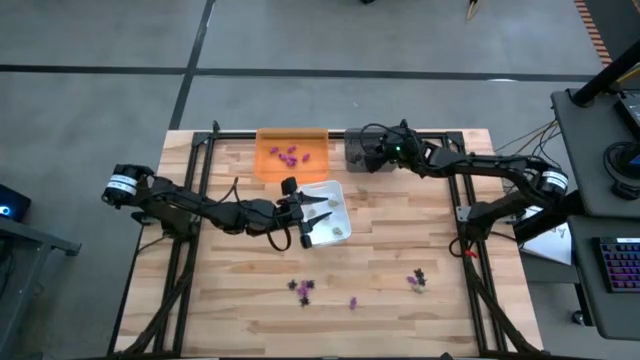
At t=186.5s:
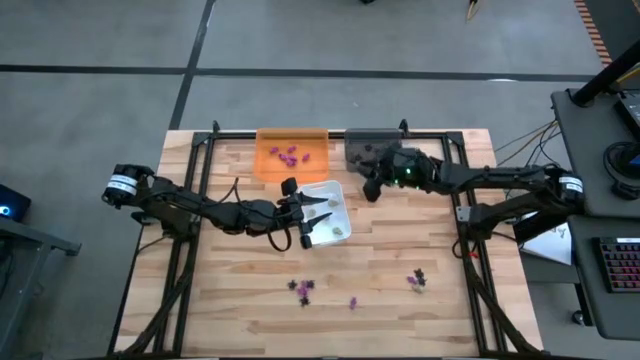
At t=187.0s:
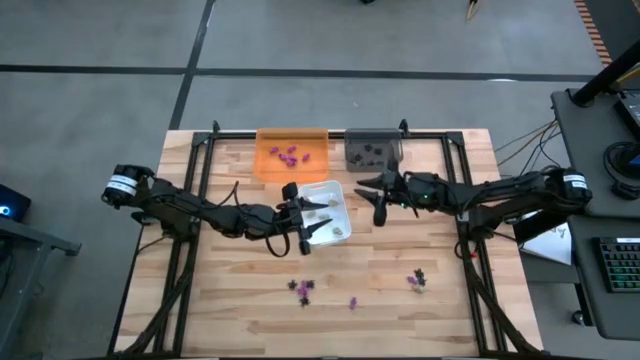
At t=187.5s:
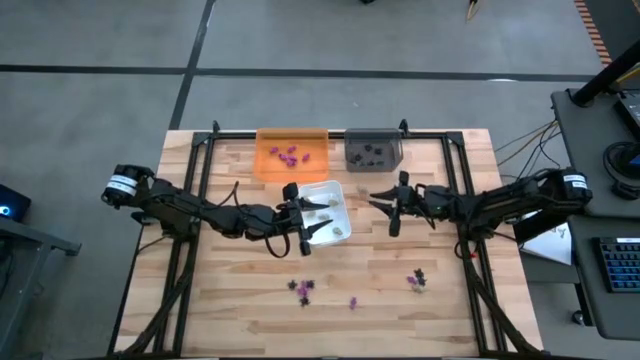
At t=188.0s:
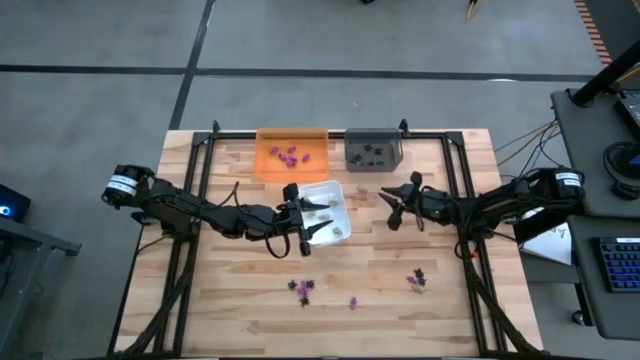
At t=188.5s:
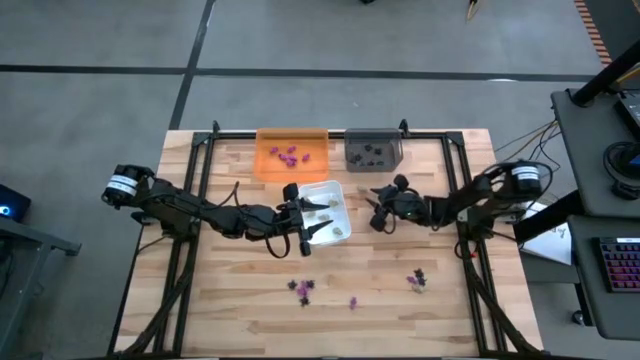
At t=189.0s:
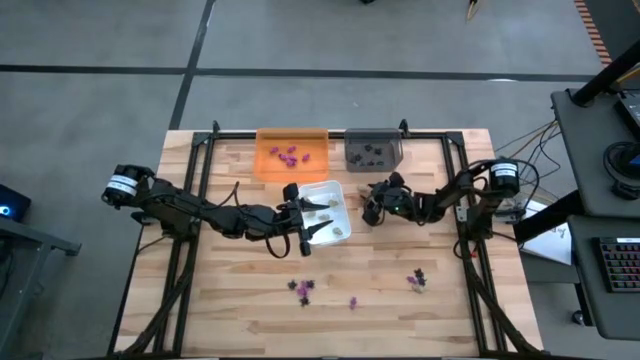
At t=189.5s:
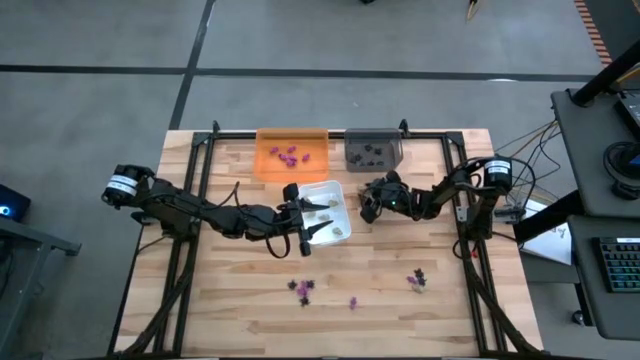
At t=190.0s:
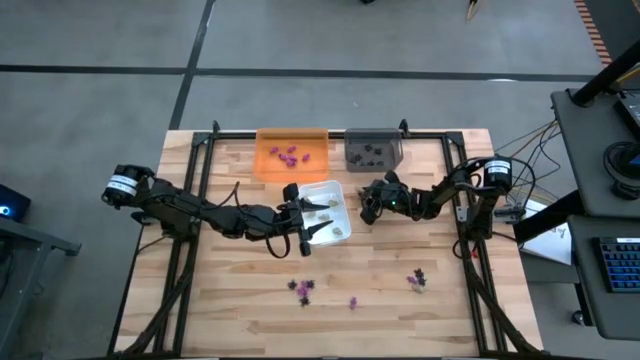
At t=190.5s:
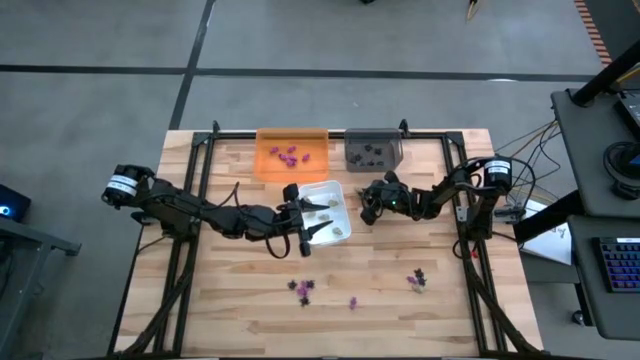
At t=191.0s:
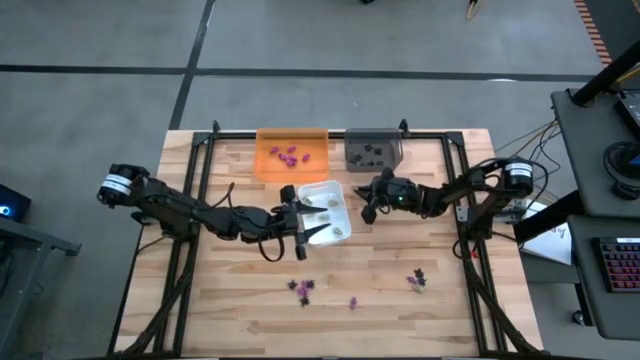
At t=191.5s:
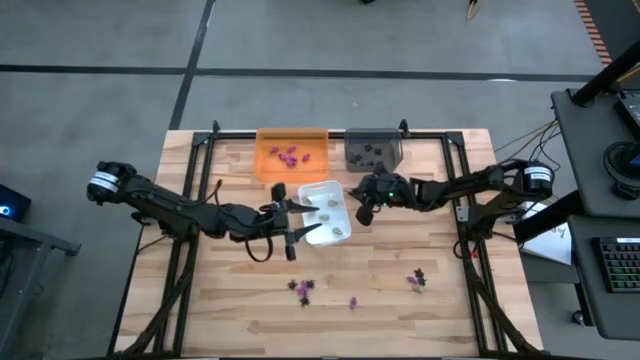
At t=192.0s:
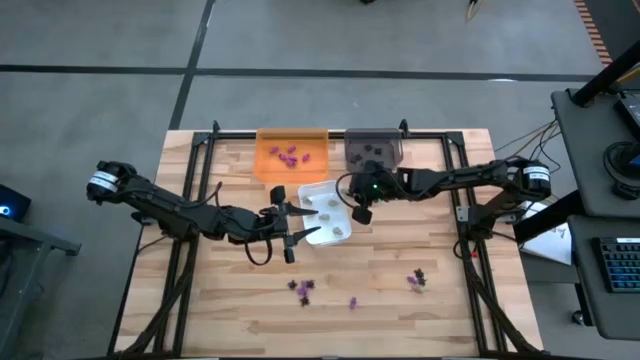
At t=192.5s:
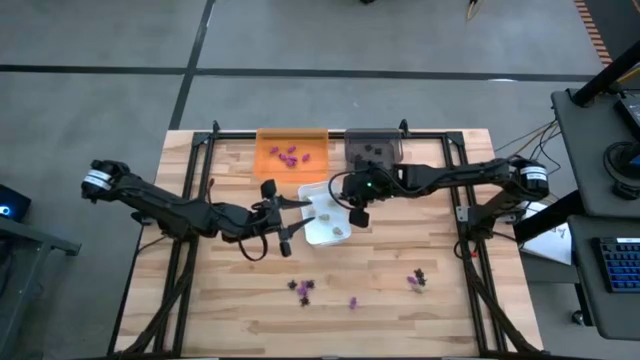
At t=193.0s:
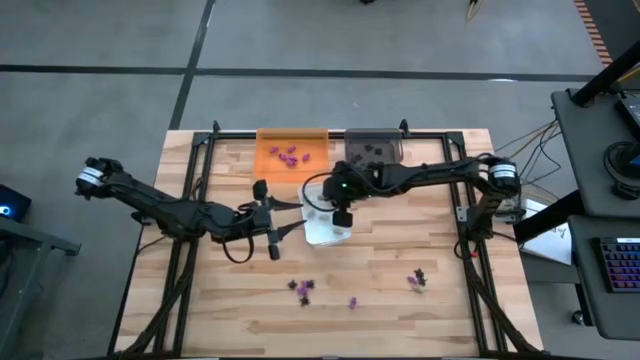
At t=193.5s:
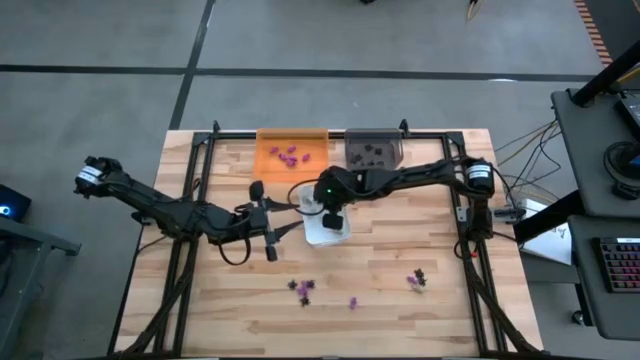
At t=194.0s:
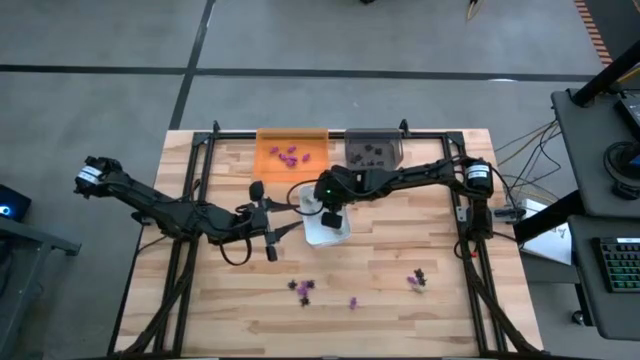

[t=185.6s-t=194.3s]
Task: Sort Halloween decoration
Put the white skull toy into the white bin

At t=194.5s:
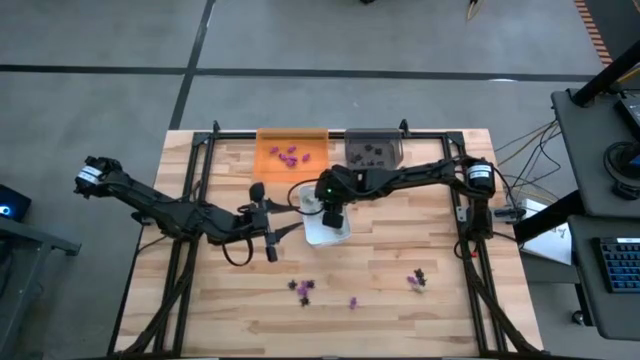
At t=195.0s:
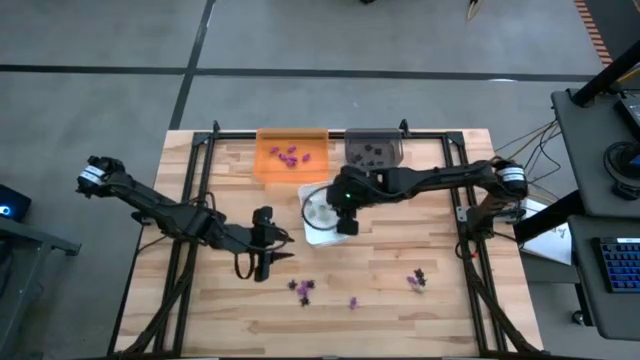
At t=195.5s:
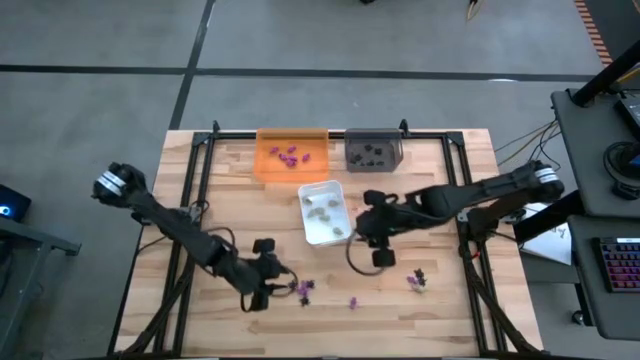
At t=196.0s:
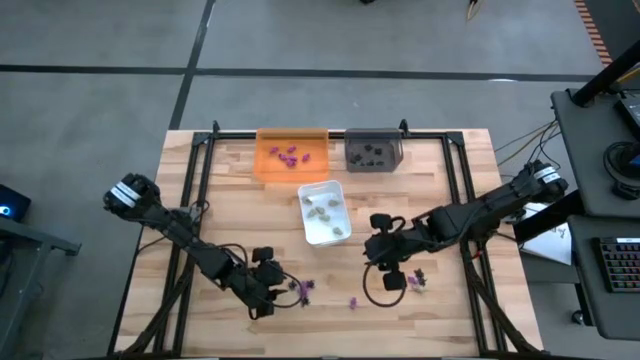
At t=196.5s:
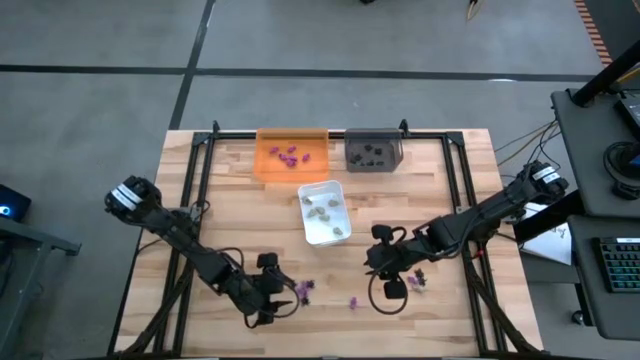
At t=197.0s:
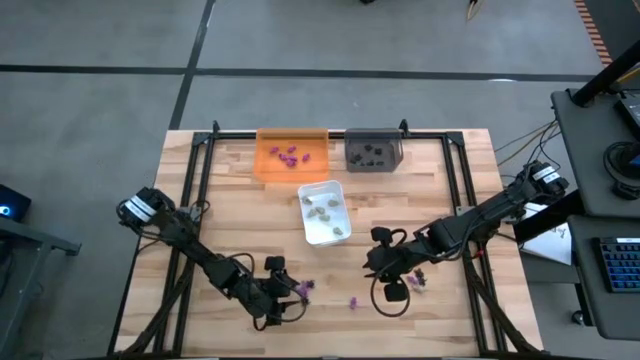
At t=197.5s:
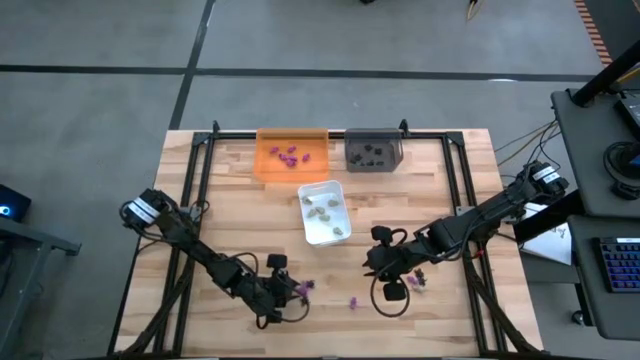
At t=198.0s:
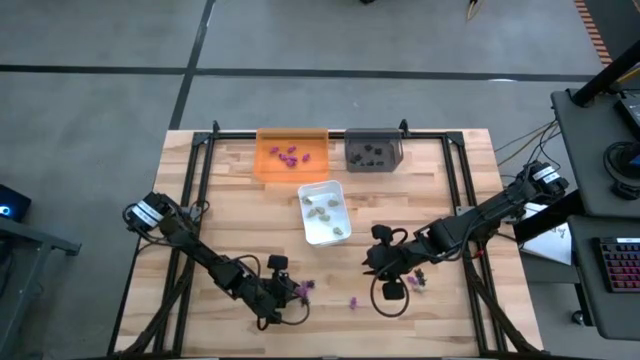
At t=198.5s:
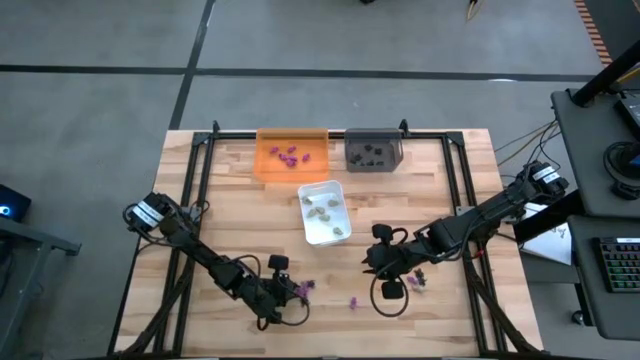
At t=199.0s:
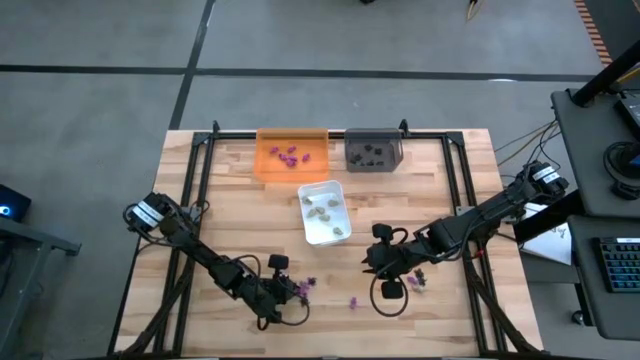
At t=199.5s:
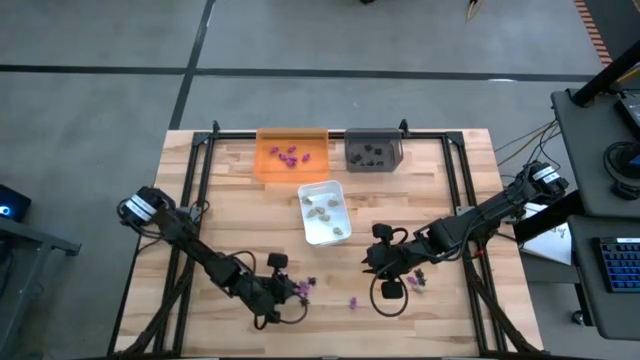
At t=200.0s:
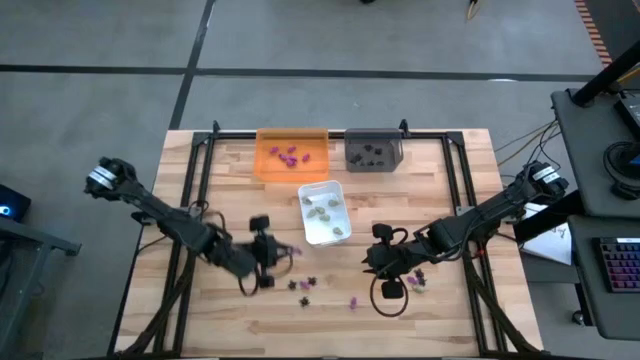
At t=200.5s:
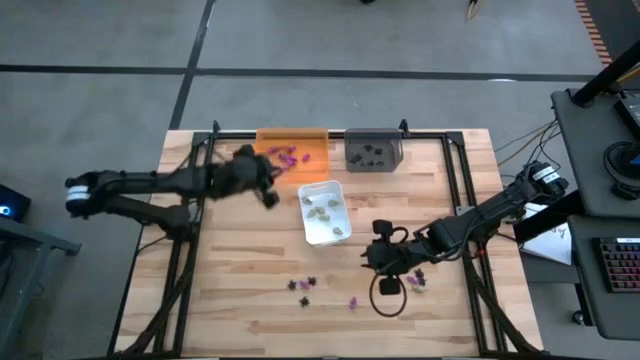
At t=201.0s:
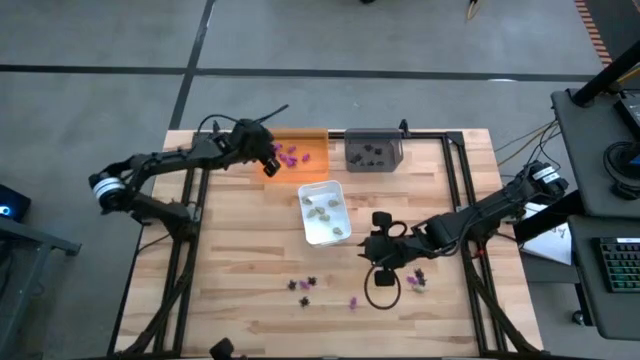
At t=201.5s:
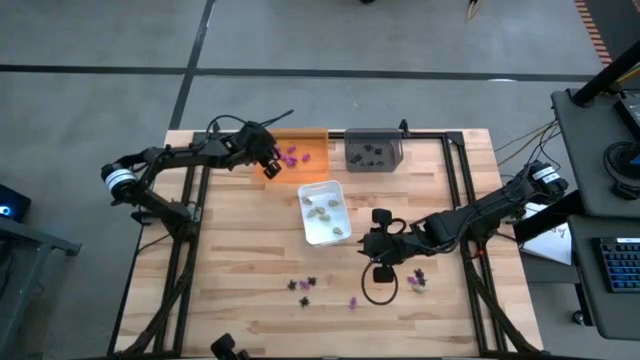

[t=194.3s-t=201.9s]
Put the purple skeleton toy into the orange bin

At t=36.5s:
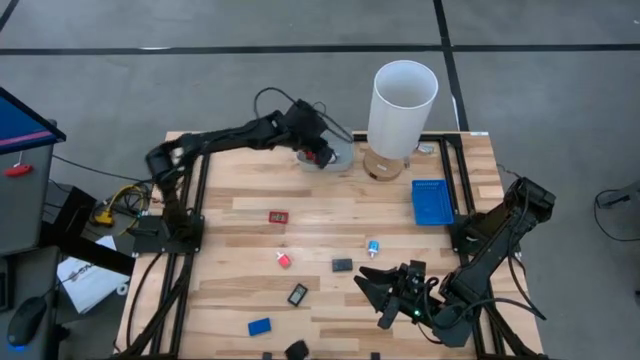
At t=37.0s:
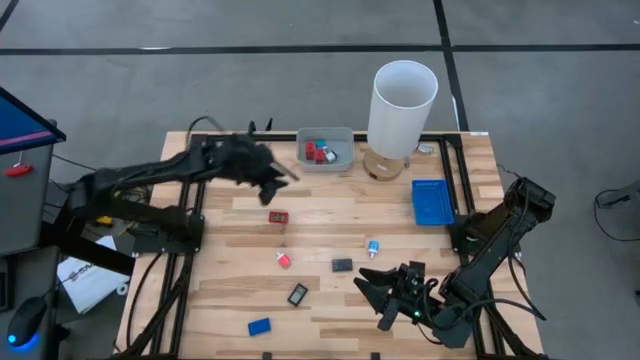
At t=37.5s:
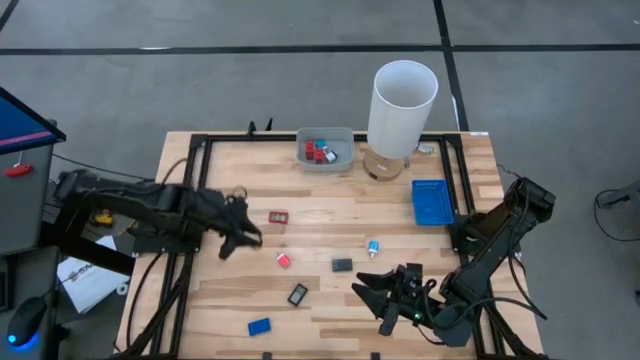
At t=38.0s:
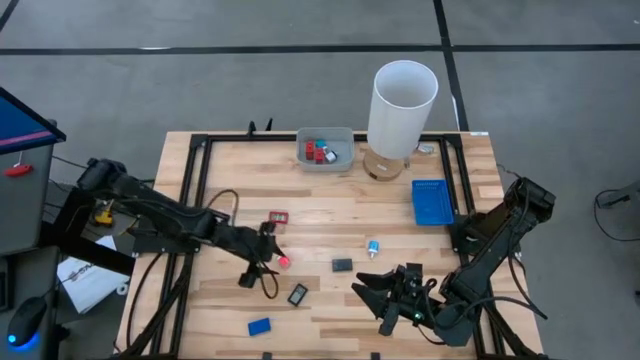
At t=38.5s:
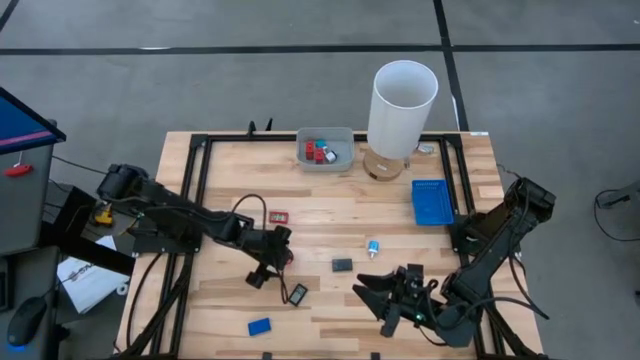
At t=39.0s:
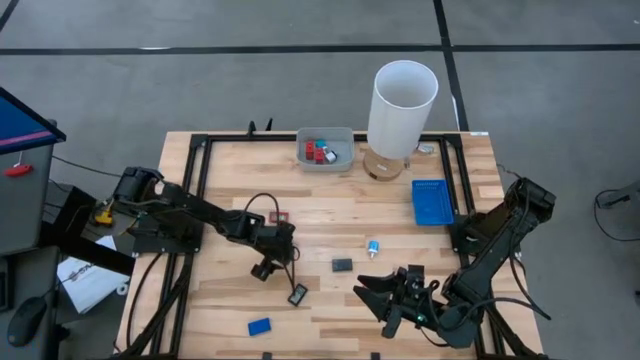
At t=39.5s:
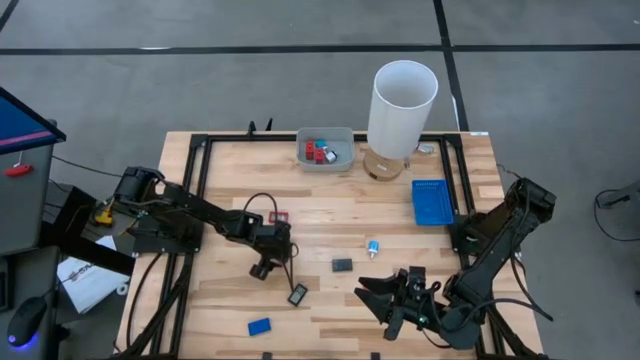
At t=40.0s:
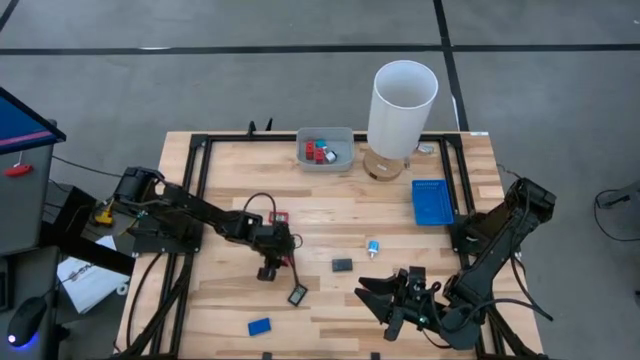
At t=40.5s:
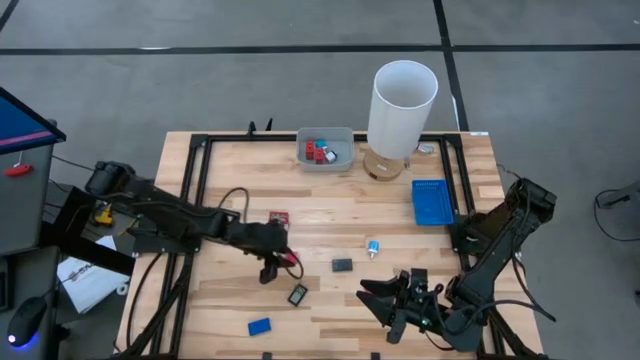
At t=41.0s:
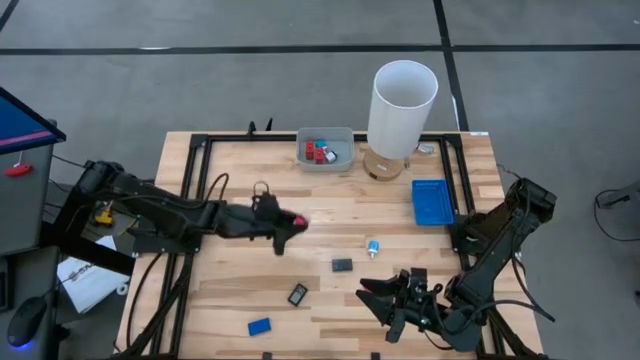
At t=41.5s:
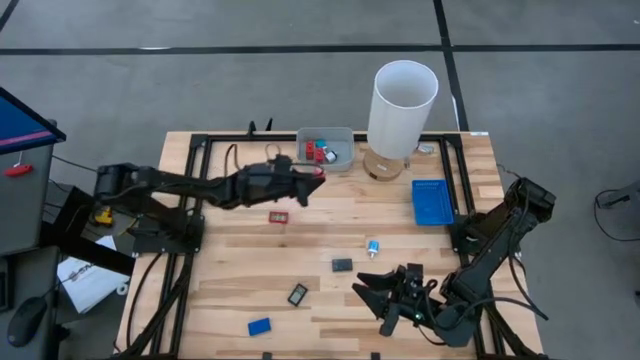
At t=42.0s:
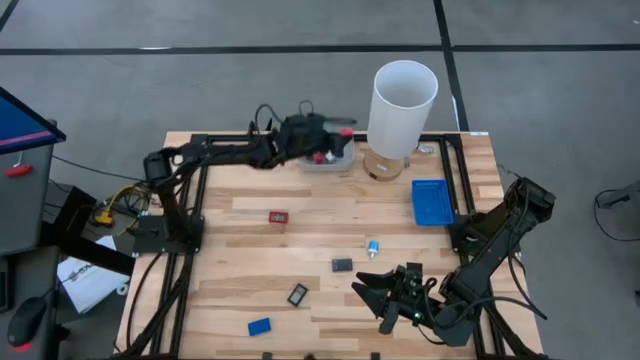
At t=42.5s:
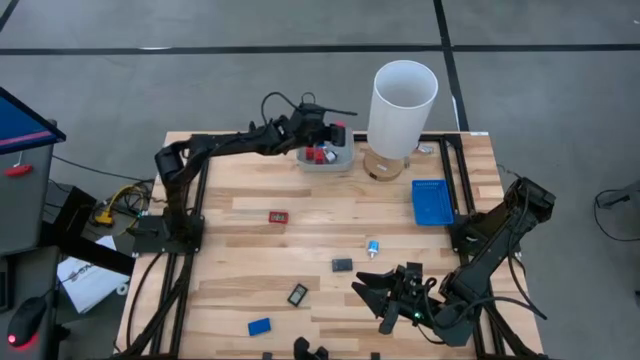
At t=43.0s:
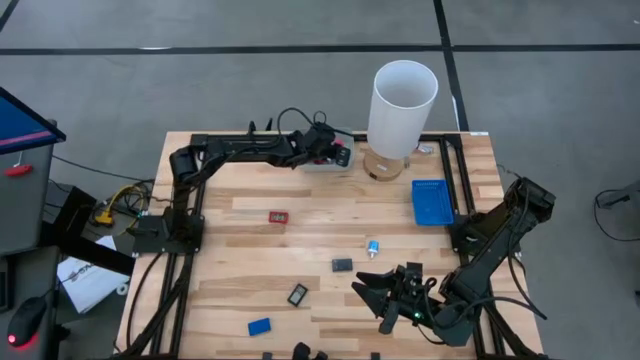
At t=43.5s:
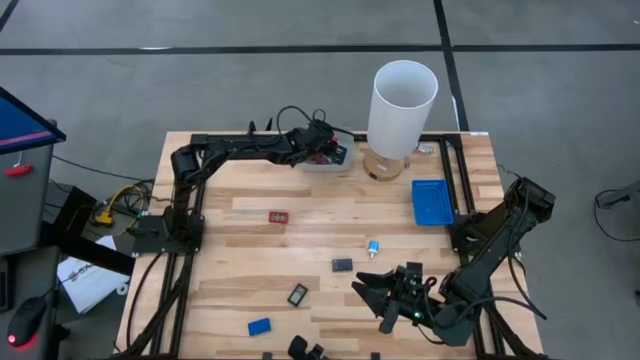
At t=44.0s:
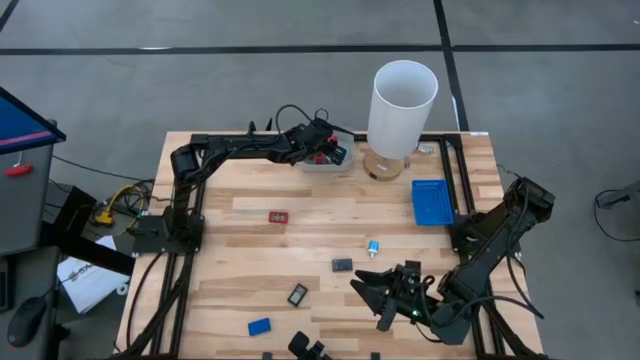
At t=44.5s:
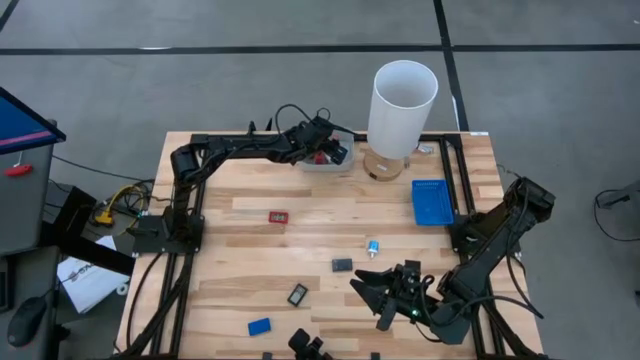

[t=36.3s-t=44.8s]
Task: Pick & Place Office items
Put the pink charger adapter into the gray bin
